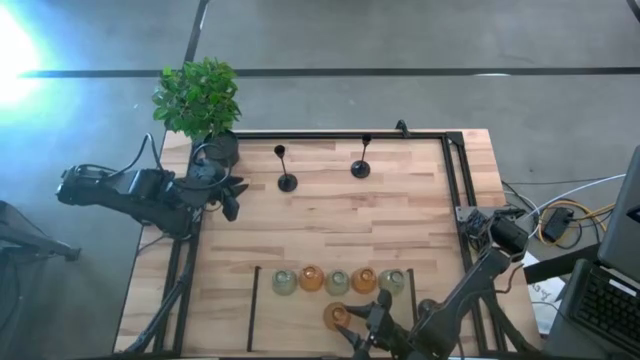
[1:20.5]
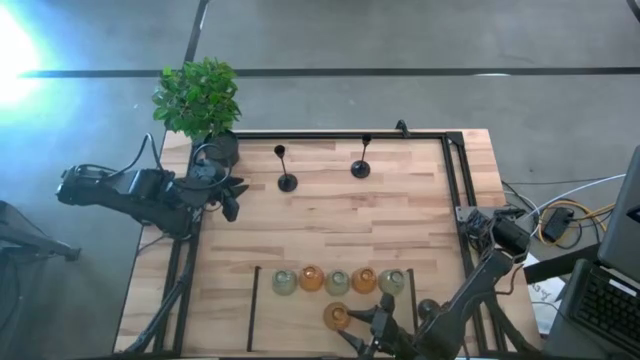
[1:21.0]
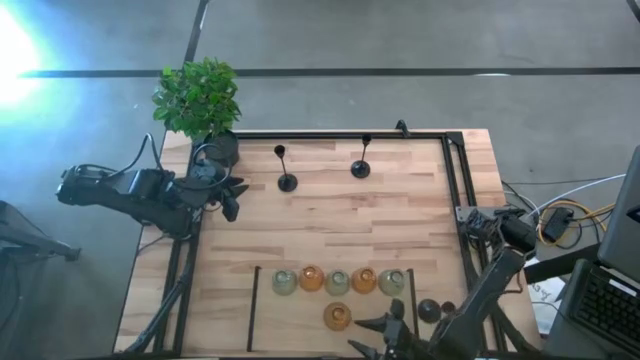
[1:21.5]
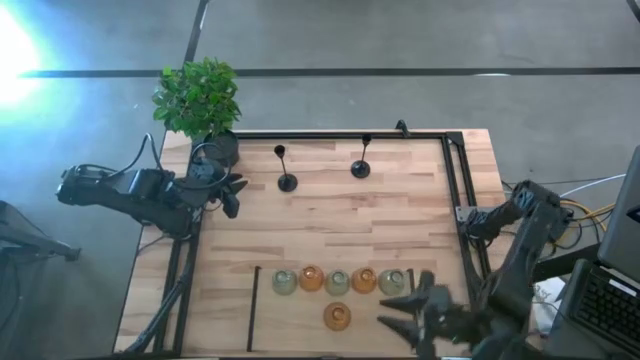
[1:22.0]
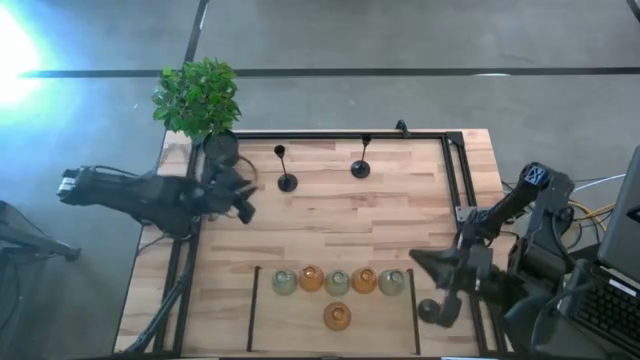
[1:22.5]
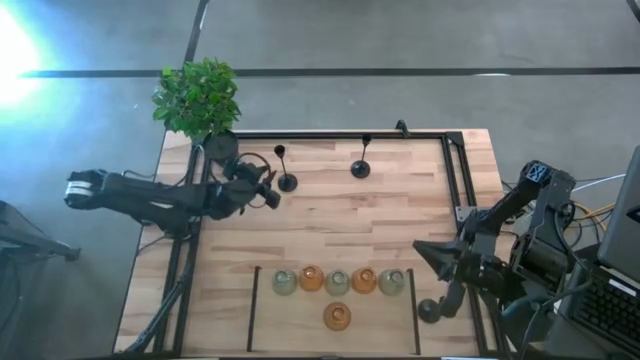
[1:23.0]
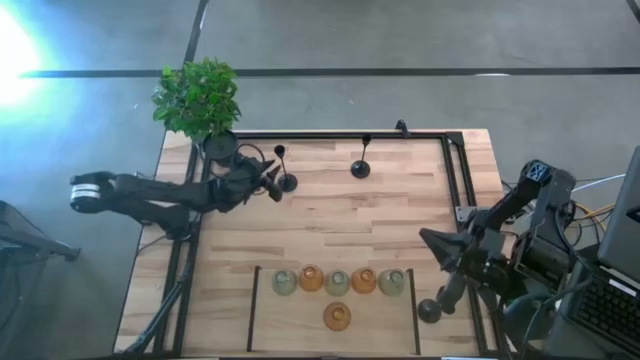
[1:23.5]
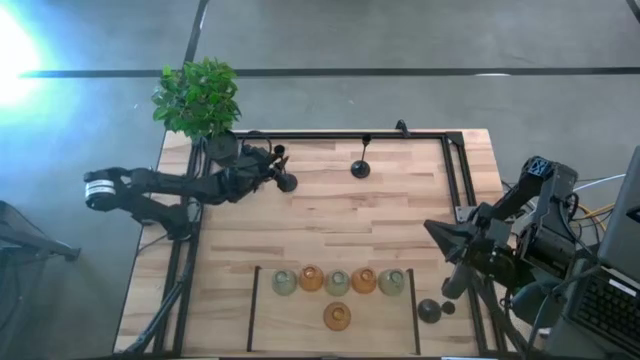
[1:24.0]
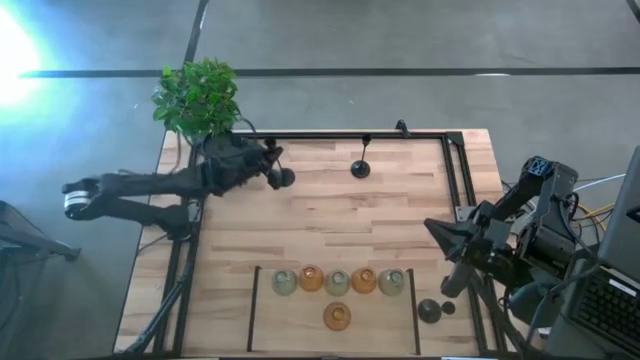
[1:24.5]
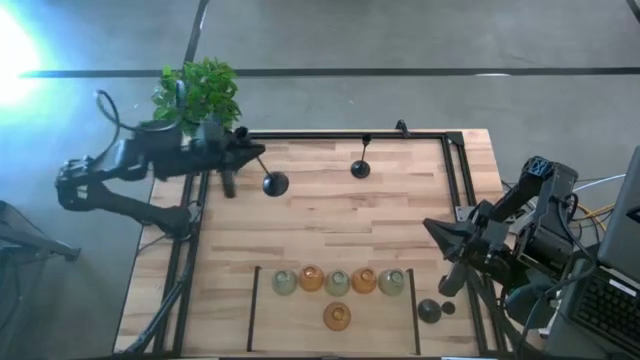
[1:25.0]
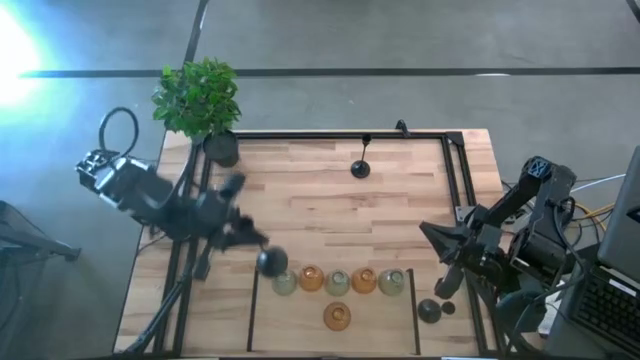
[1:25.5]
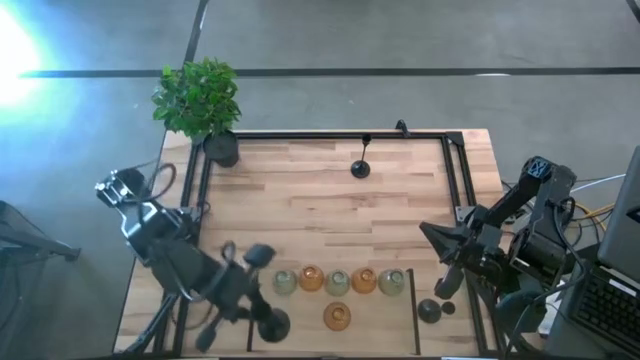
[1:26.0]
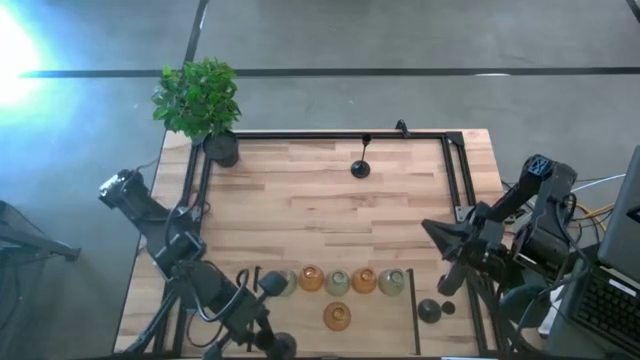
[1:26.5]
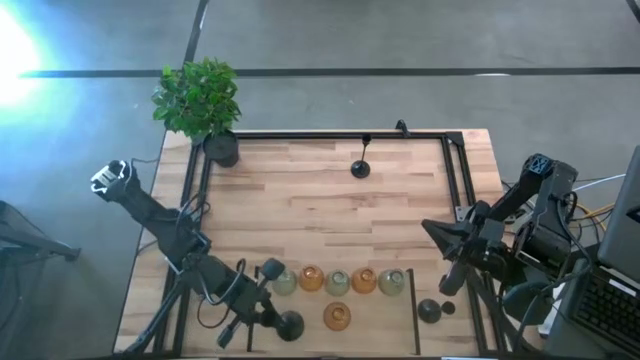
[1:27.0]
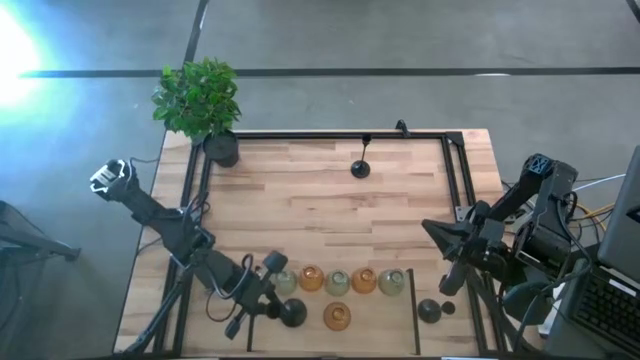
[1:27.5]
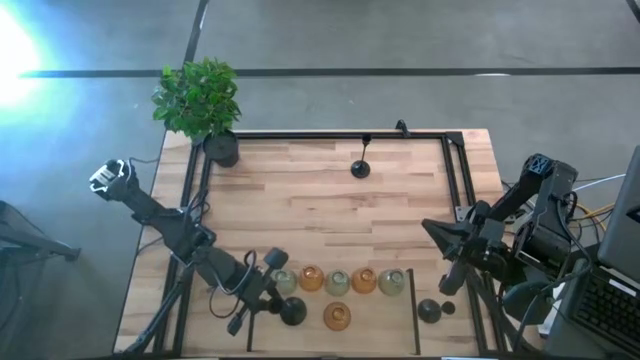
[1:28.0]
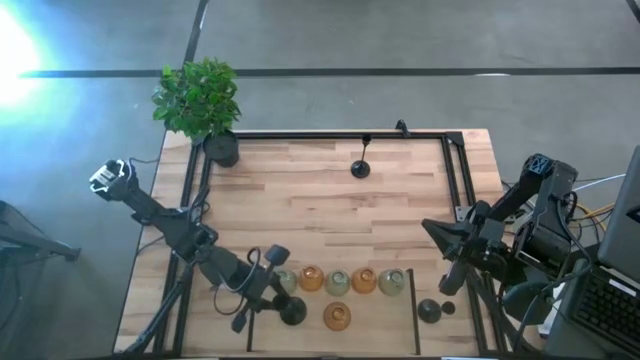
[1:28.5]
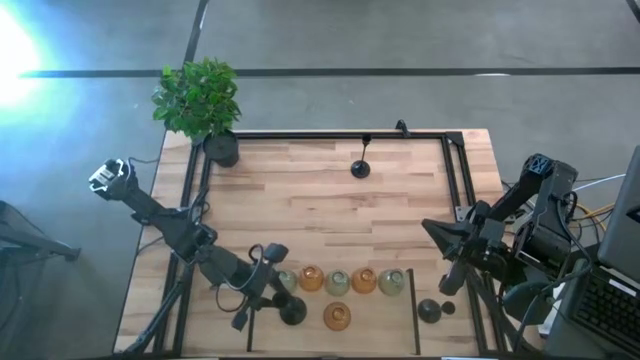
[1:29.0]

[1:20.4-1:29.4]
Task: Pick & Place candle stick holders
Put the top left black candle holder on the shelf

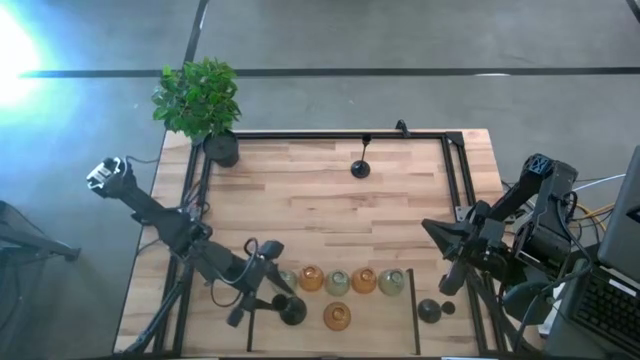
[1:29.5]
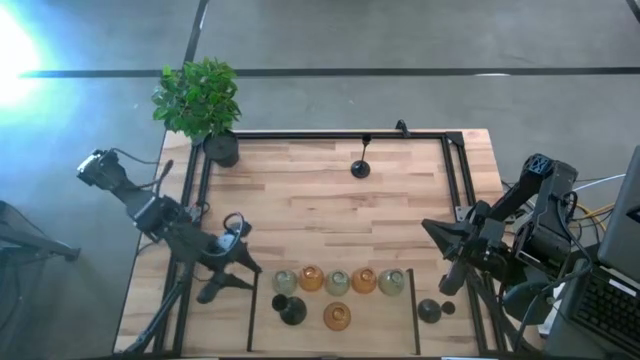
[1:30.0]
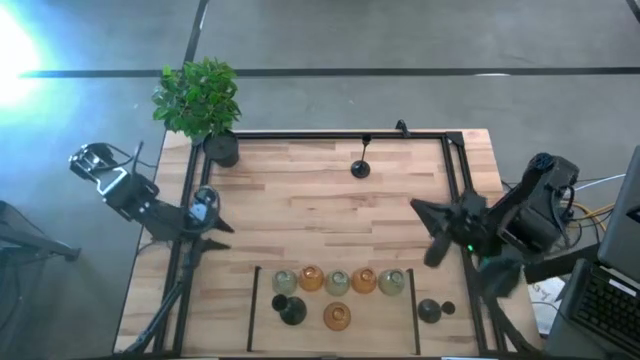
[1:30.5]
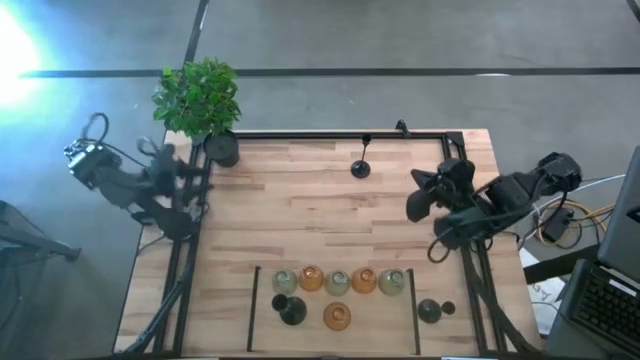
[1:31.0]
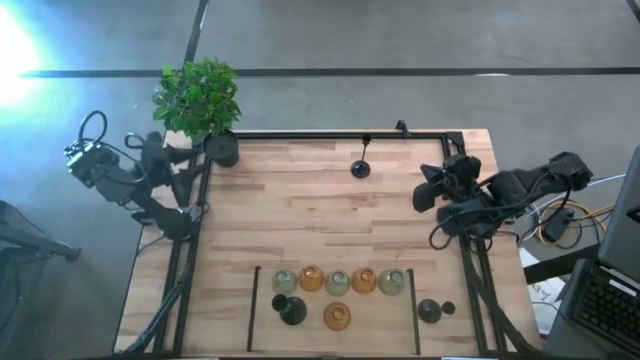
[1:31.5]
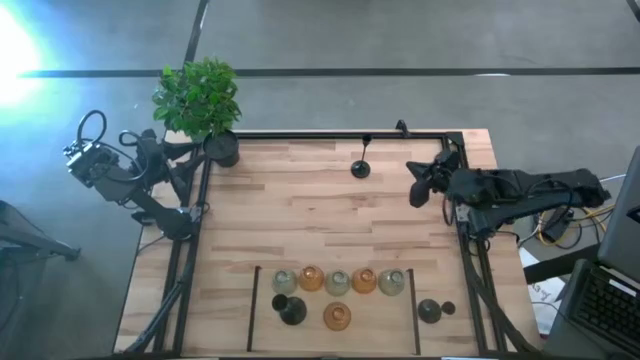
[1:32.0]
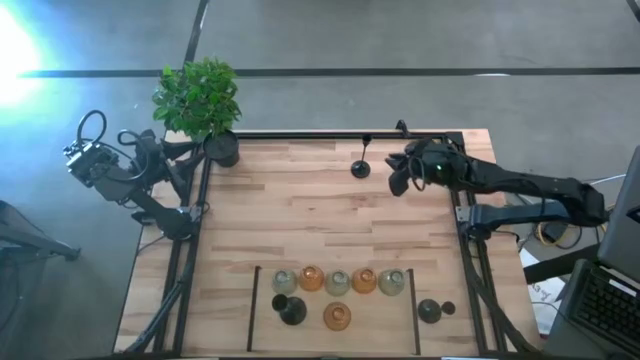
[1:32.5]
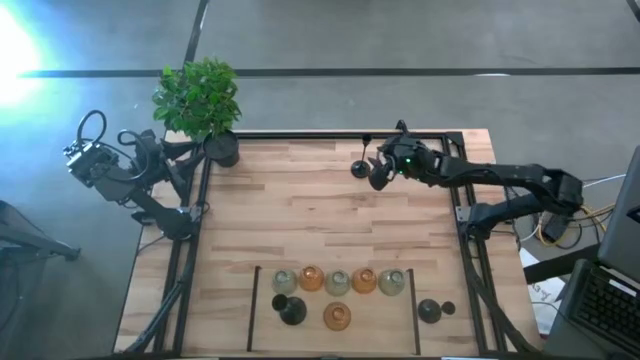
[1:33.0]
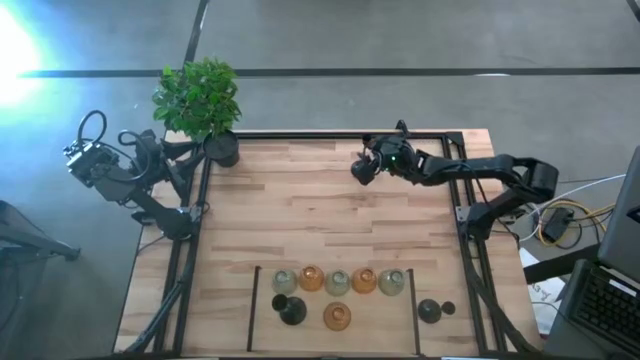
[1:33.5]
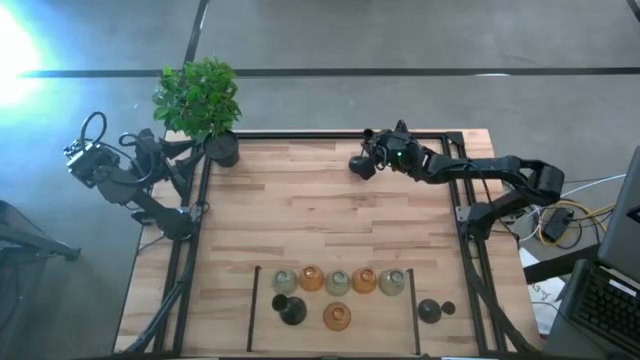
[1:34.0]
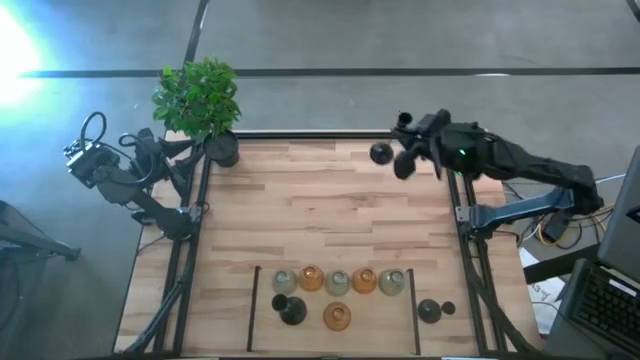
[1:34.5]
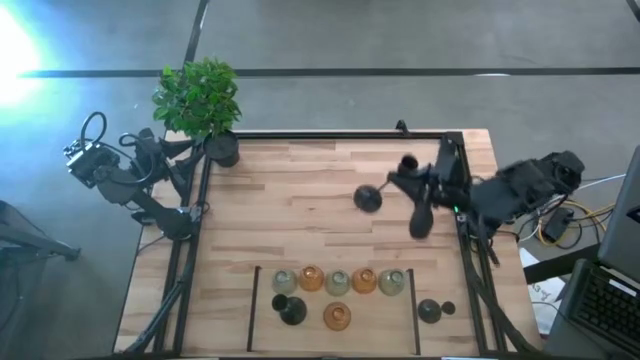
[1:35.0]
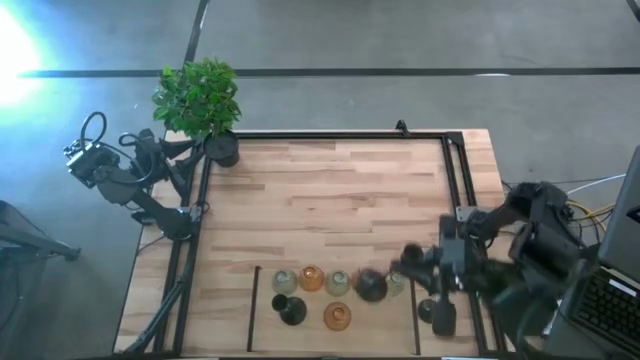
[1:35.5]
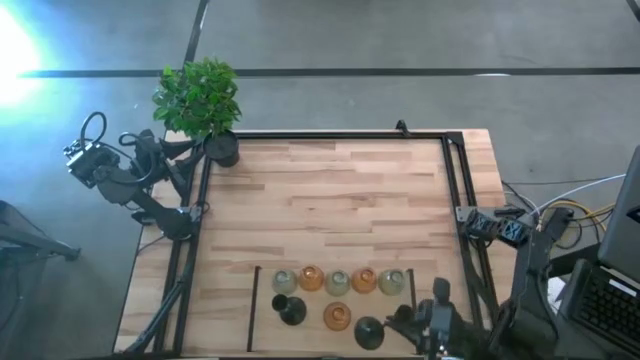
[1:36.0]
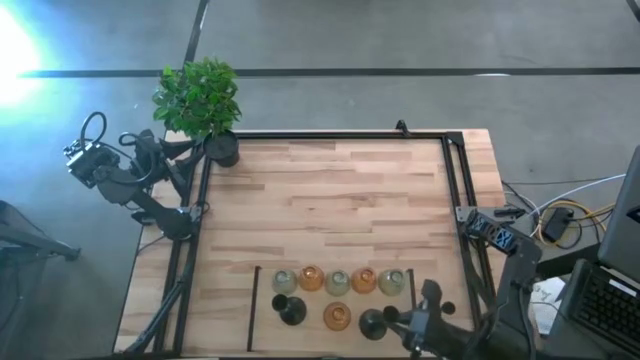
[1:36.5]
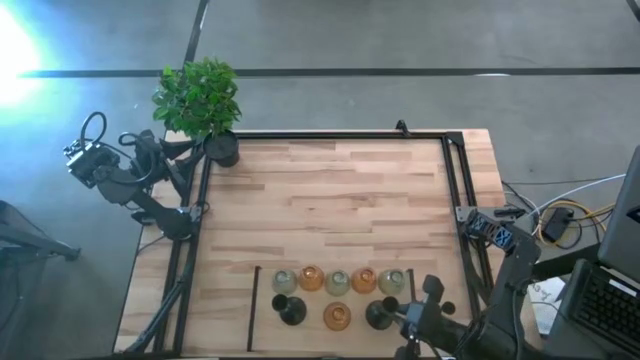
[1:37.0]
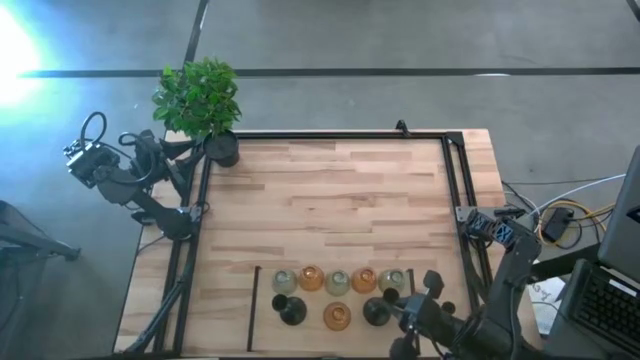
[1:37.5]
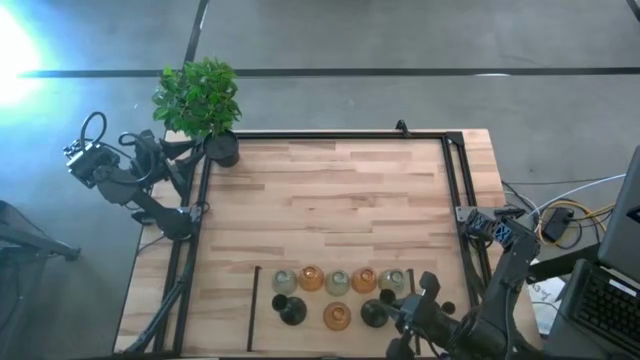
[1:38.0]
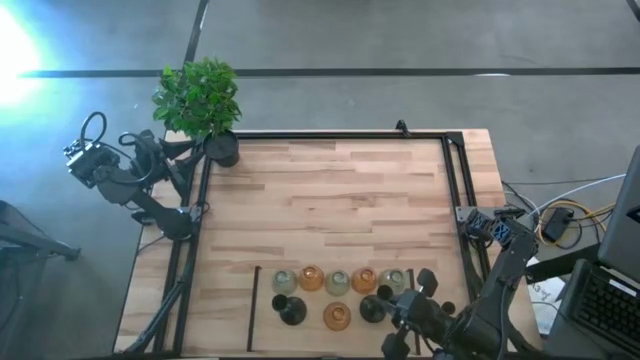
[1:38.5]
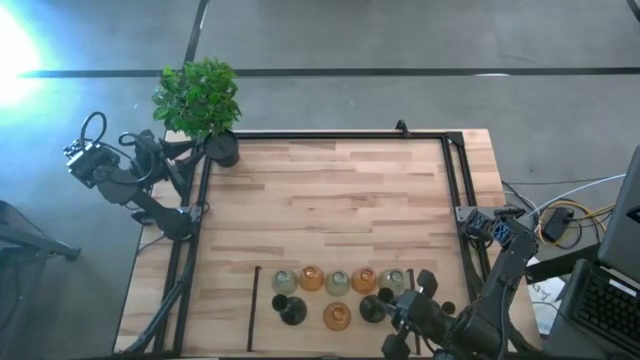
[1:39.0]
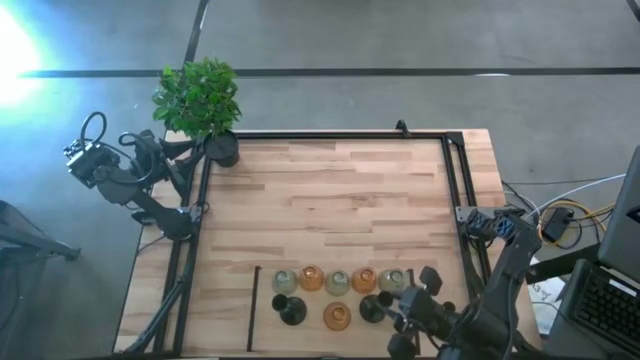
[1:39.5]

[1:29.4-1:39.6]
Put the top black candle holder on the shelf

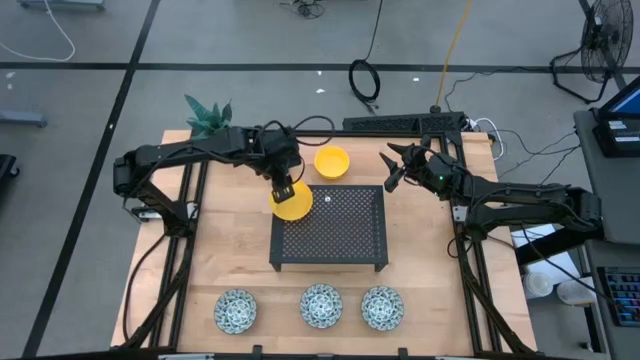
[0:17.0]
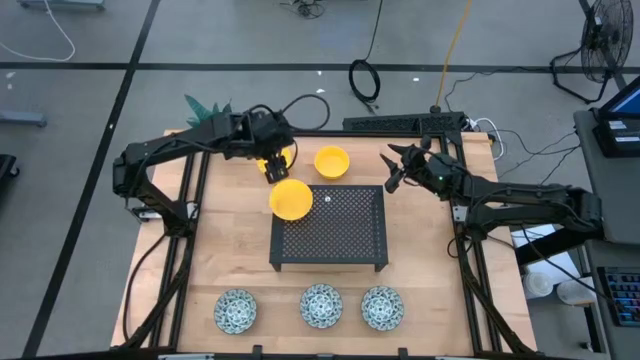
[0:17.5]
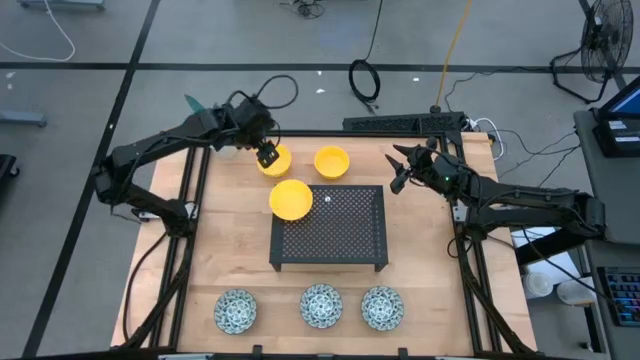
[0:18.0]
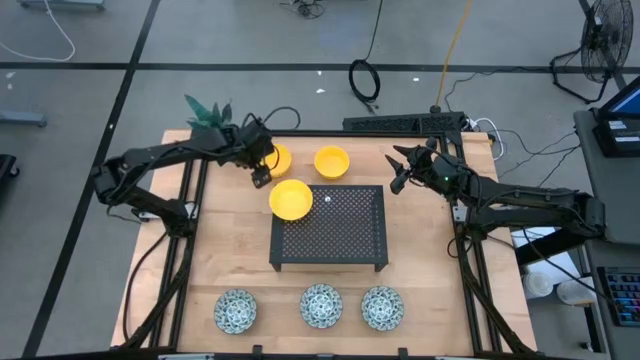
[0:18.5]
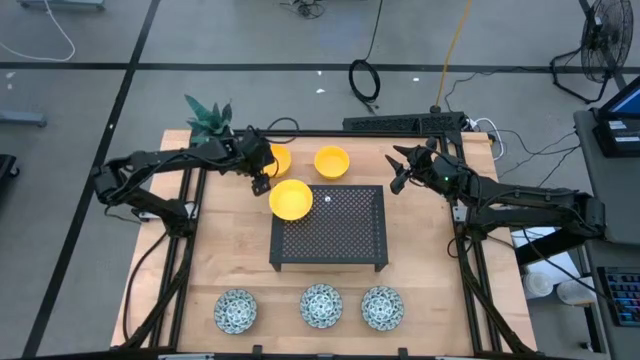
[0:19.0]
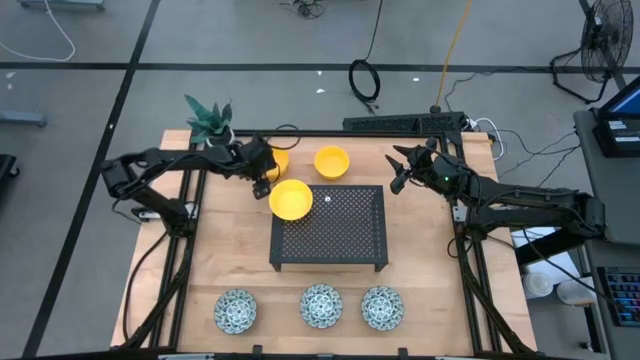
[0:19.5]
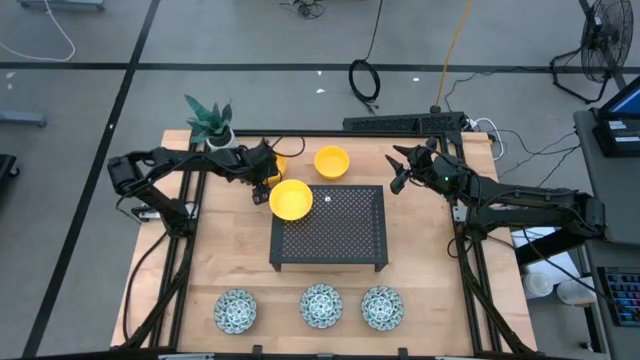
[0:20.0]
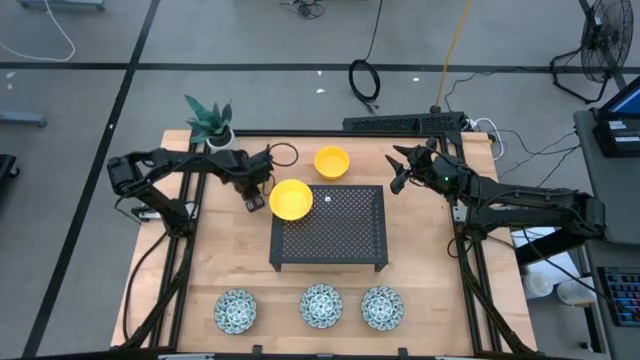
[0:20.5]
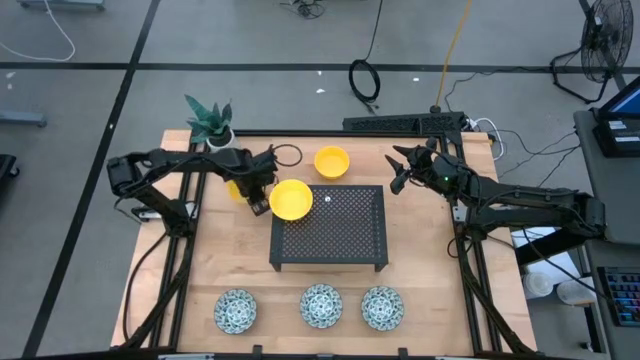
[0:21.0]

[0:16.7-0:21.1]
Task: Pick & Place Mini bowls
Stack the left yellow bowl on top of the yellow bowl on the shelf
